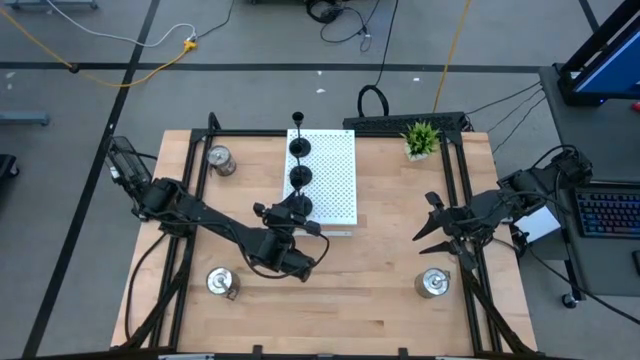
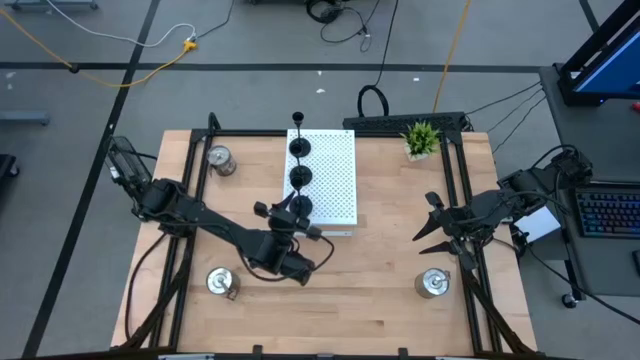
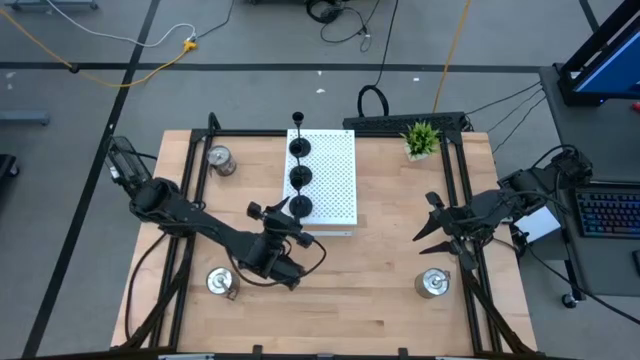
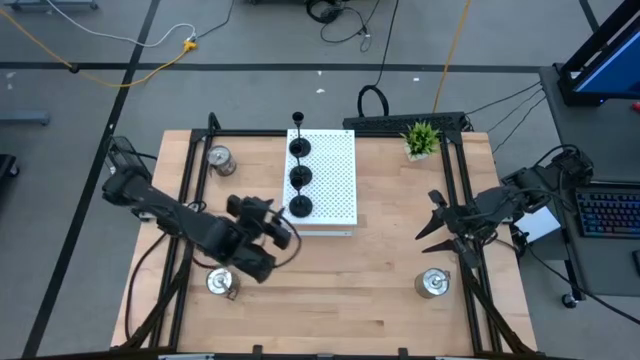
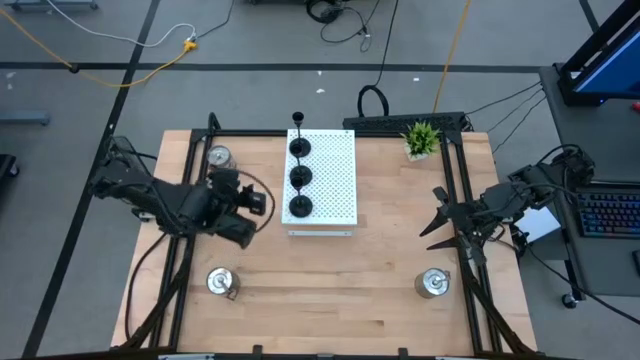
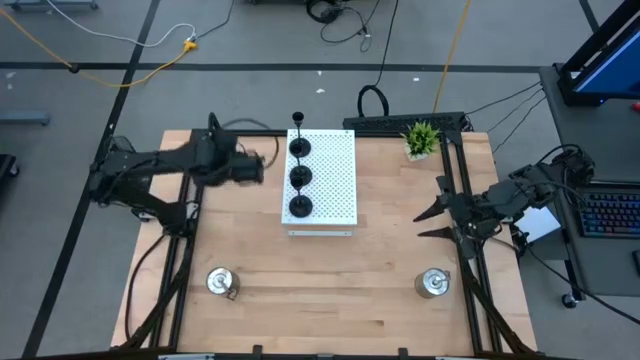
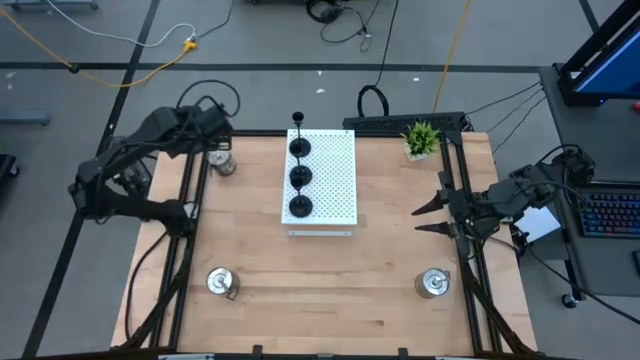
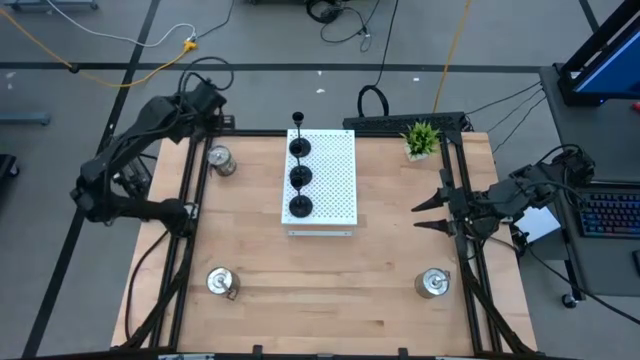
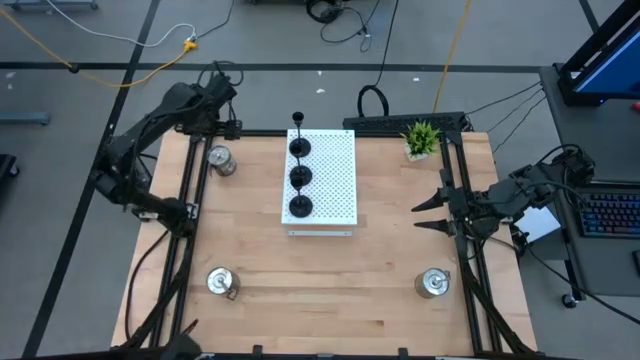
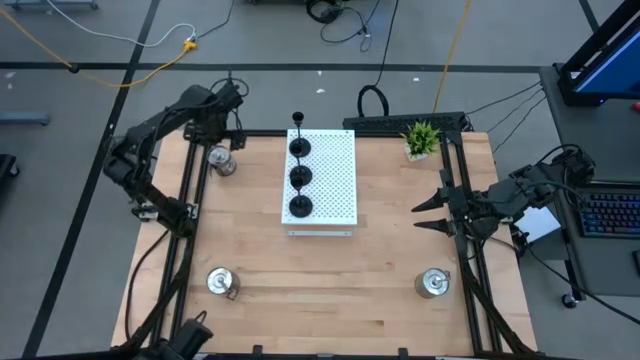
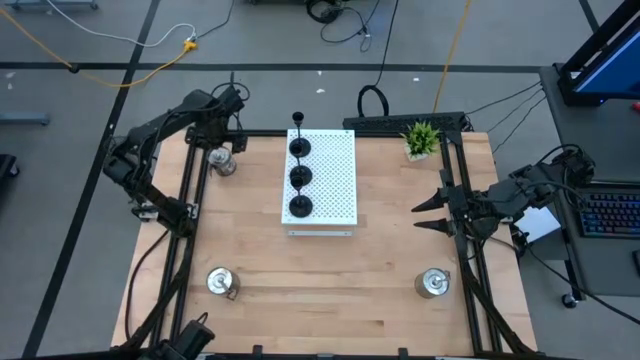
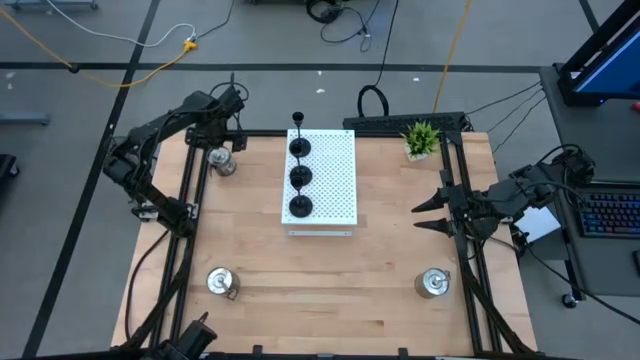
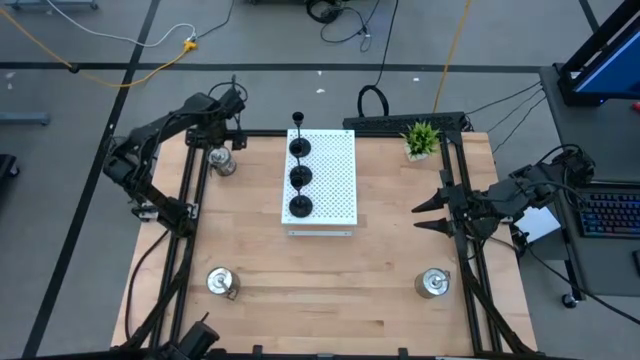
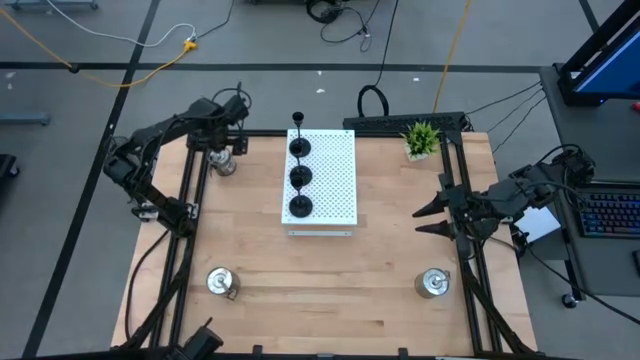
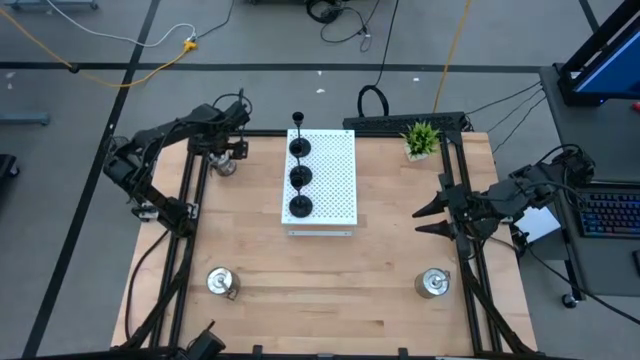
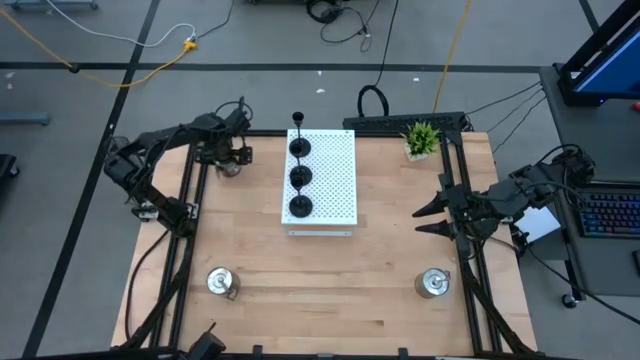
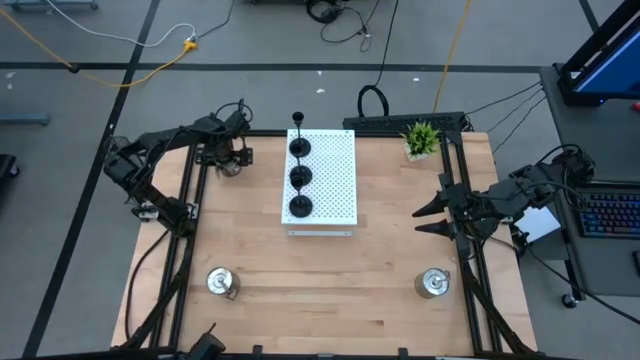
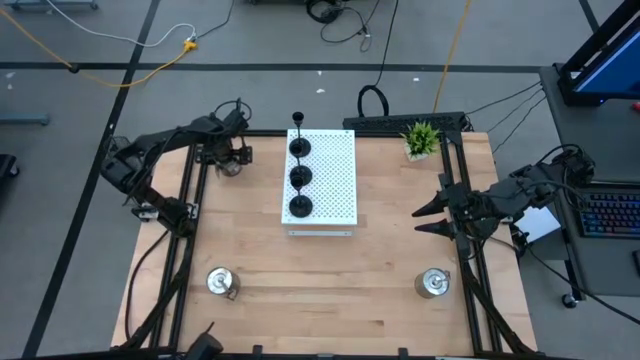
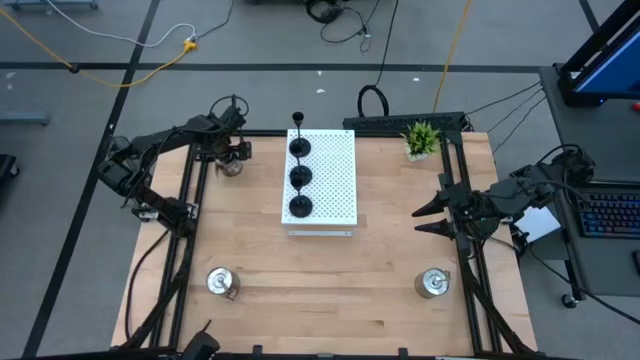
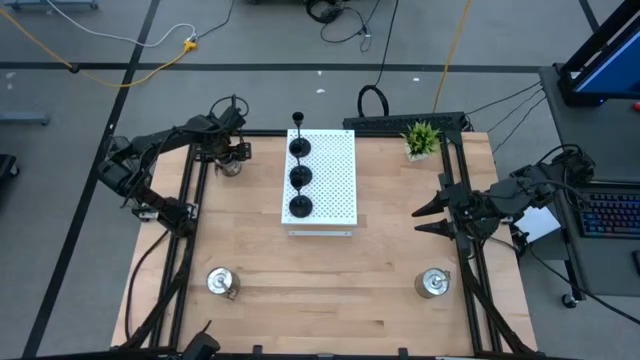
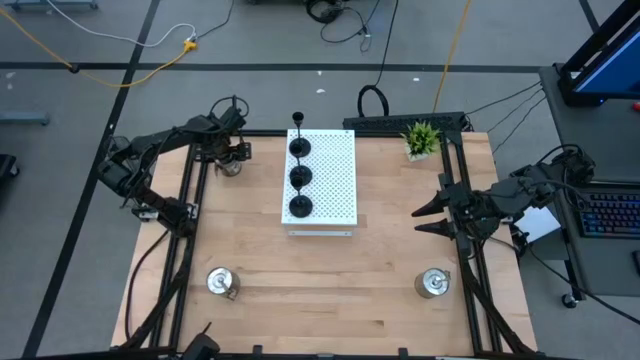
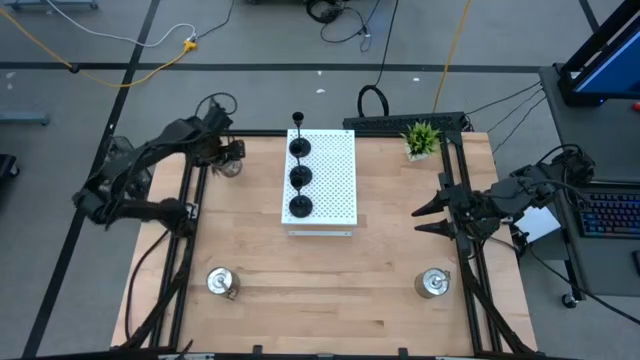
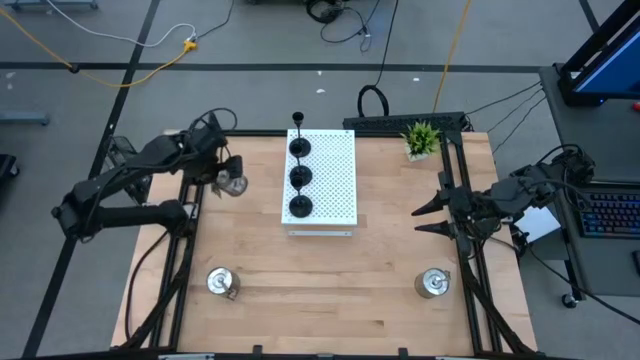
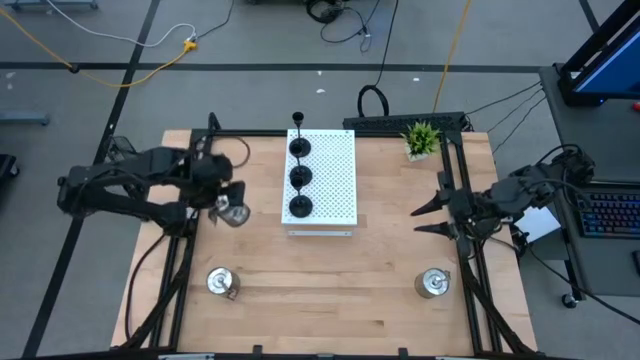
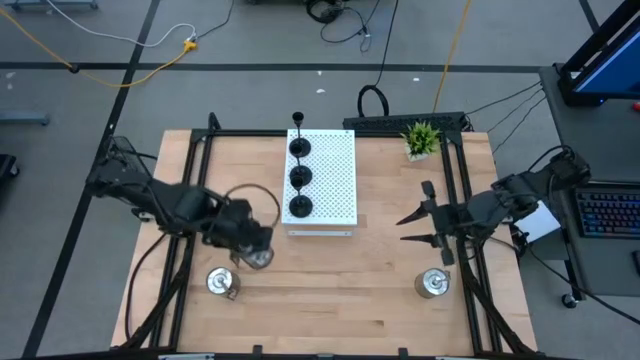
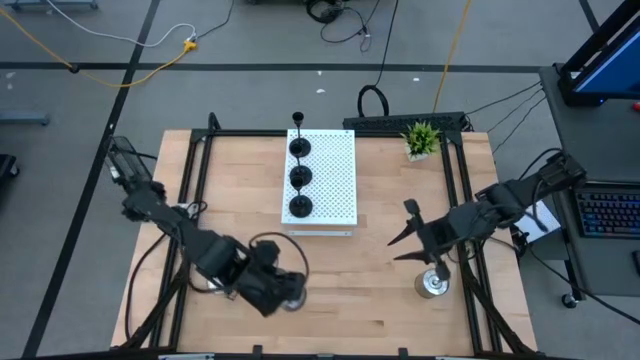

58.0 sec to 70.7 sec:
Task: Pick & Place candle stick holders
Put the top left silver scented candle on the shelf

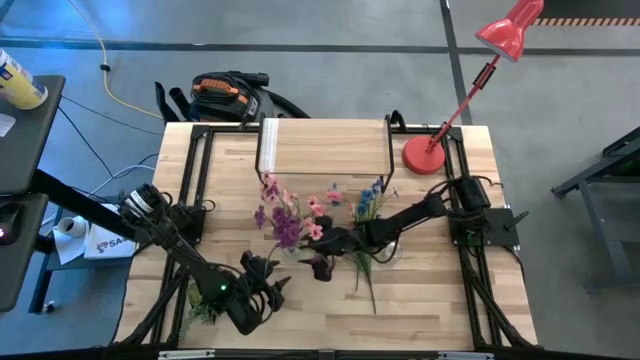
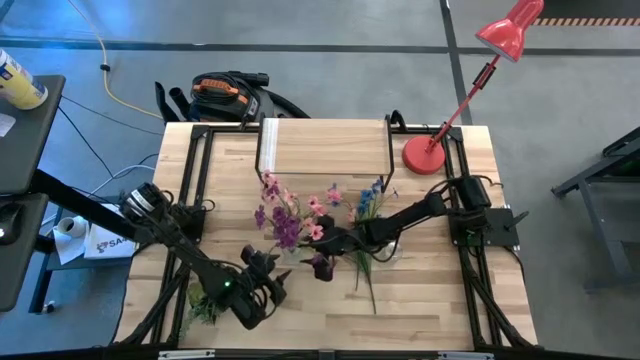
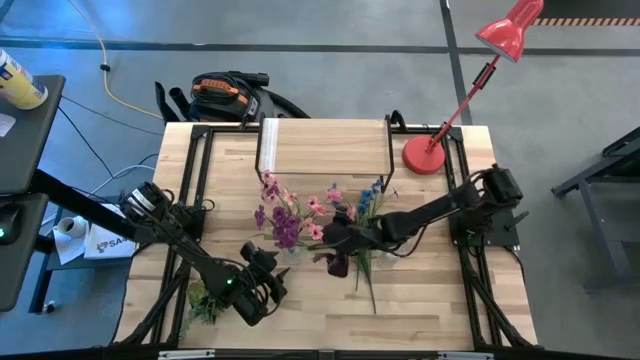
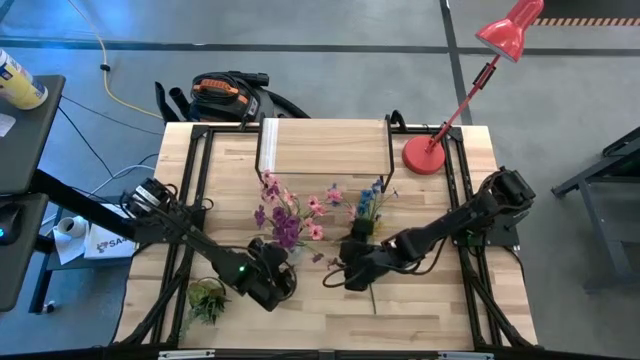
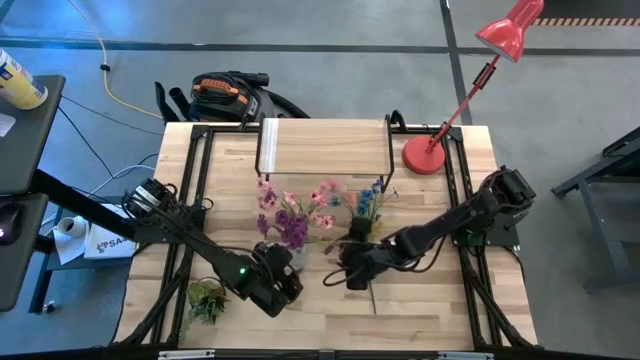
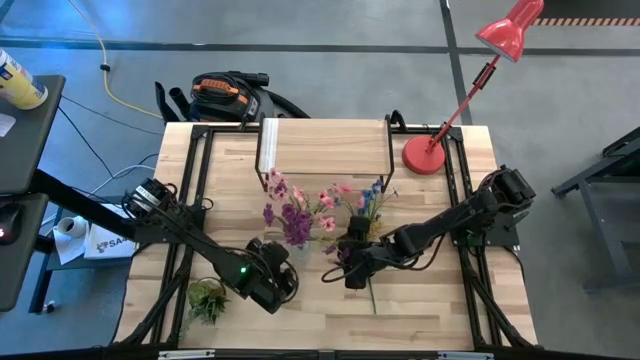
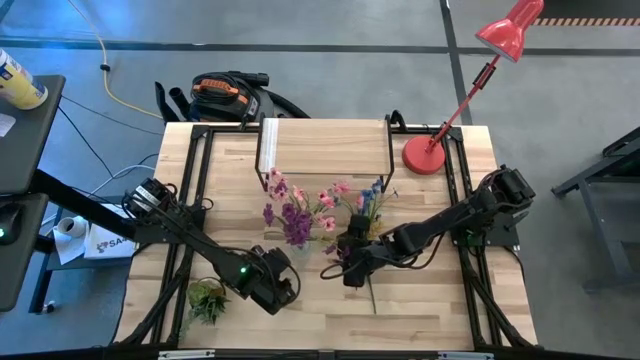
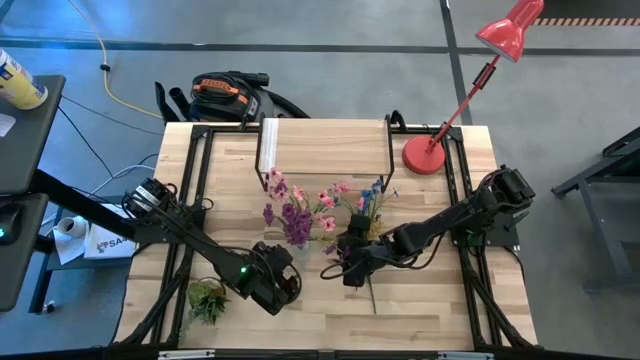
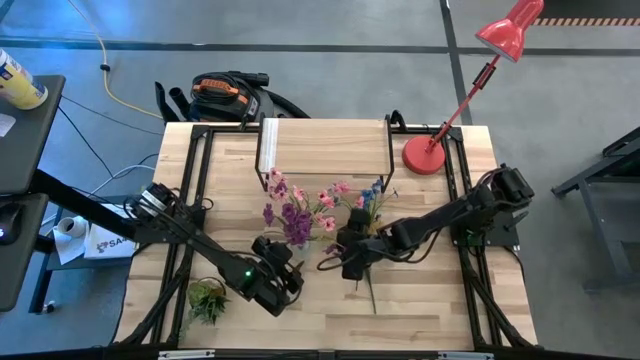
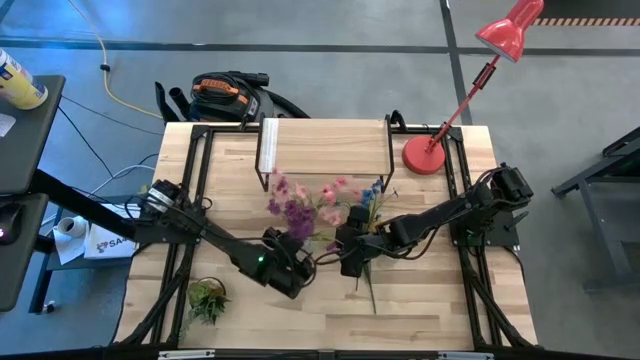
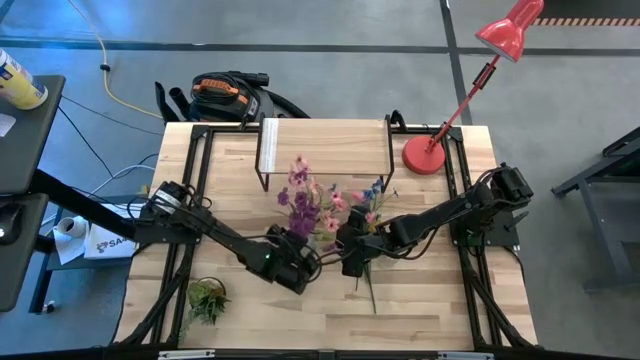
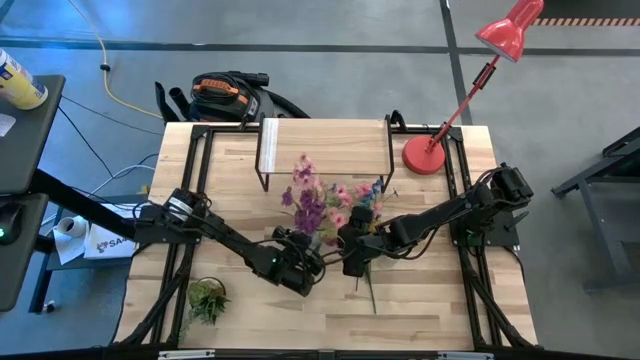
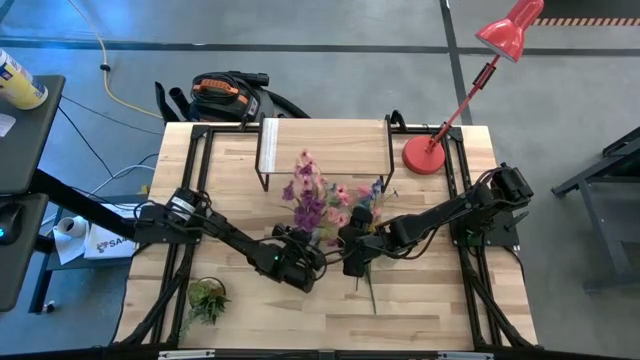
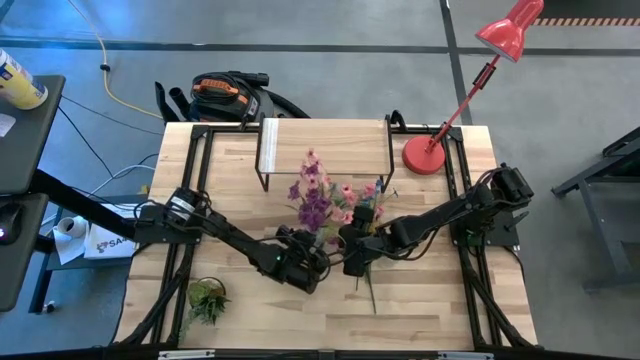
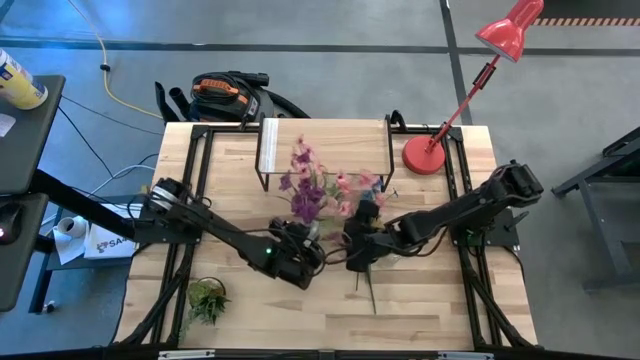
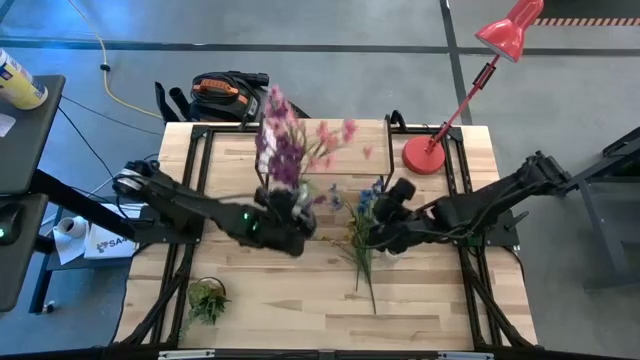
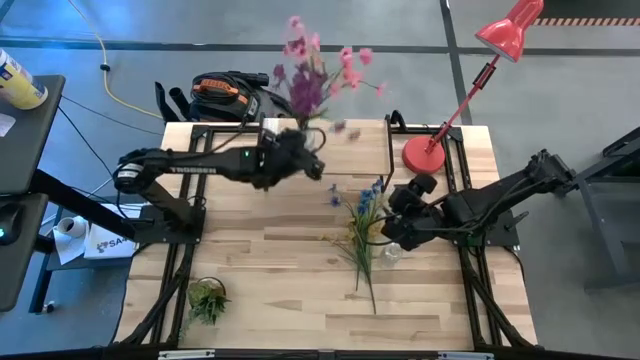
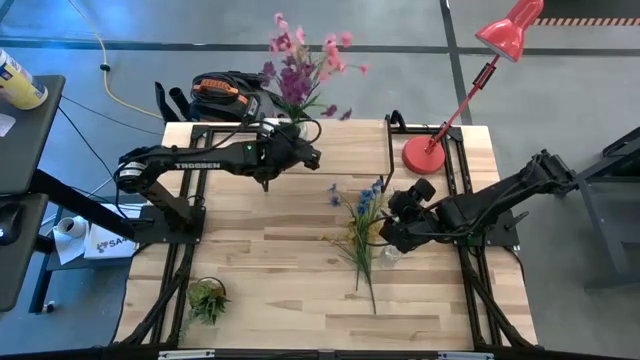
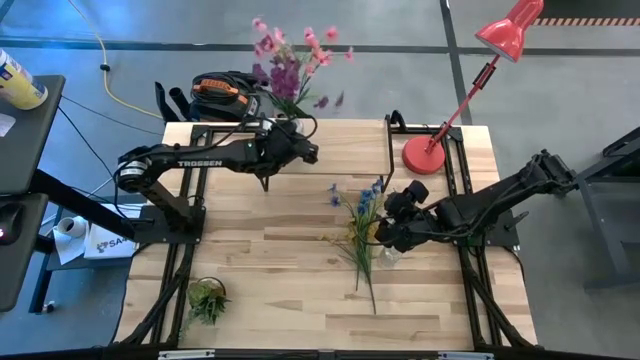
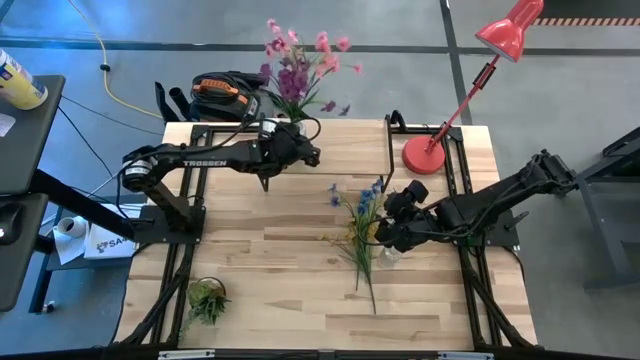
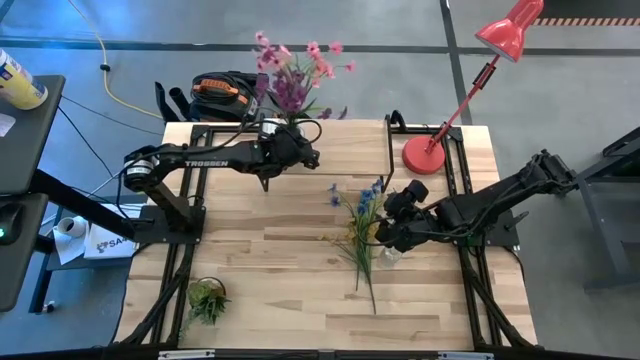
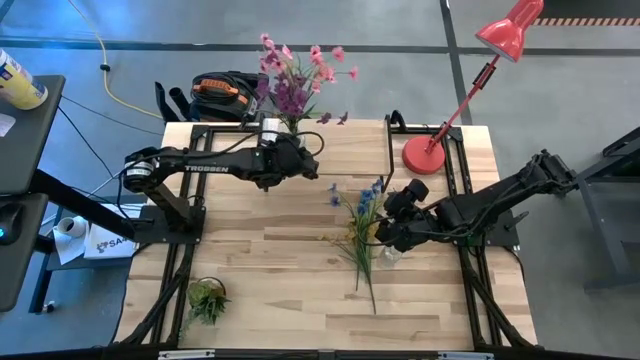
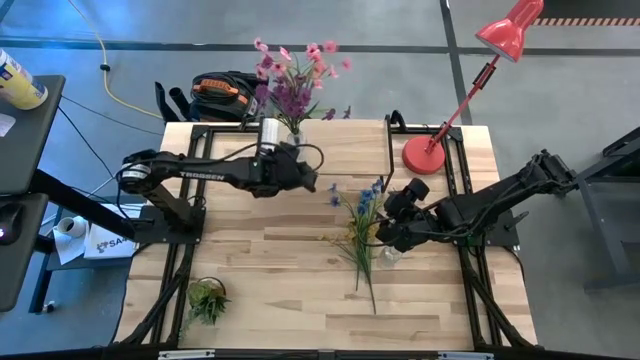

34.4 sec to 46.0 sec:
Task: Pick and place flowers into a vace then onto a shelf
Put the left transparent vase on the shelf
